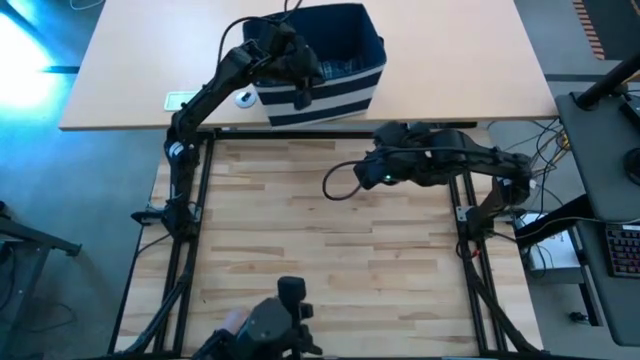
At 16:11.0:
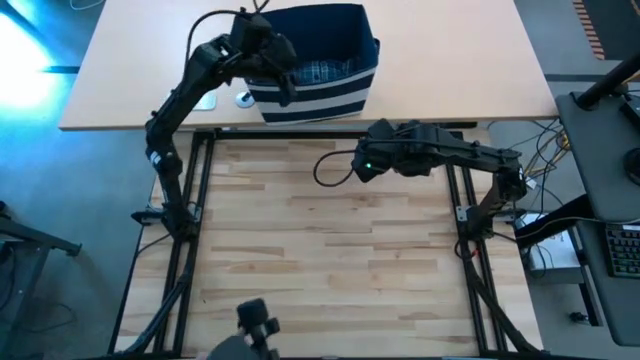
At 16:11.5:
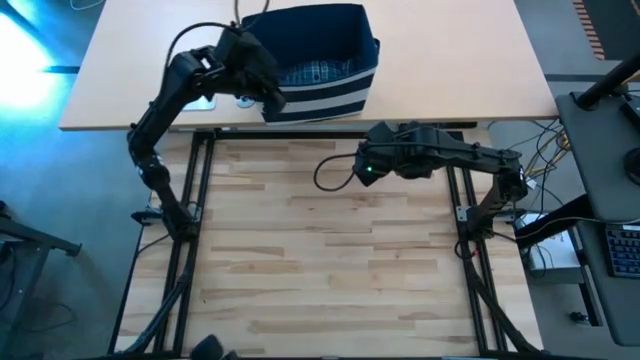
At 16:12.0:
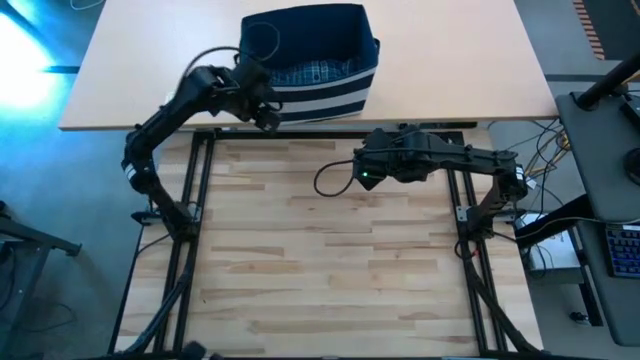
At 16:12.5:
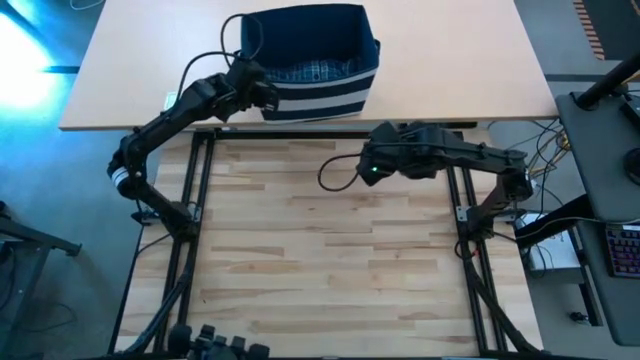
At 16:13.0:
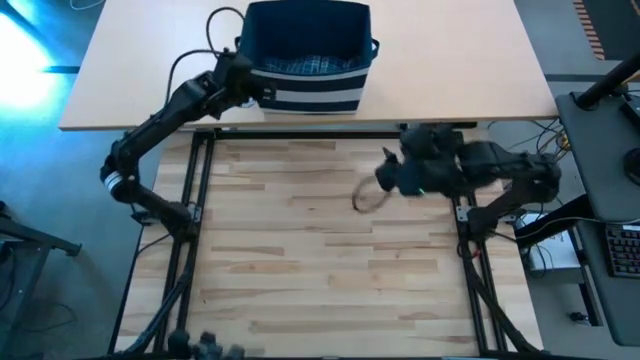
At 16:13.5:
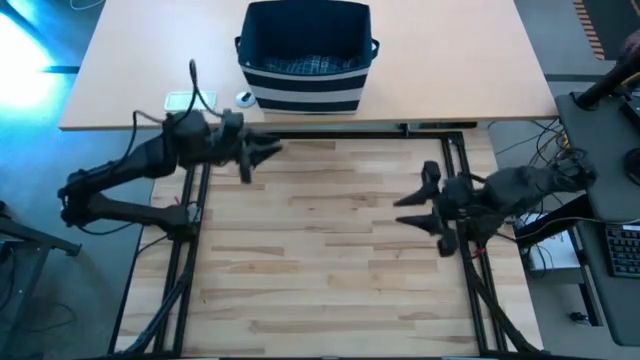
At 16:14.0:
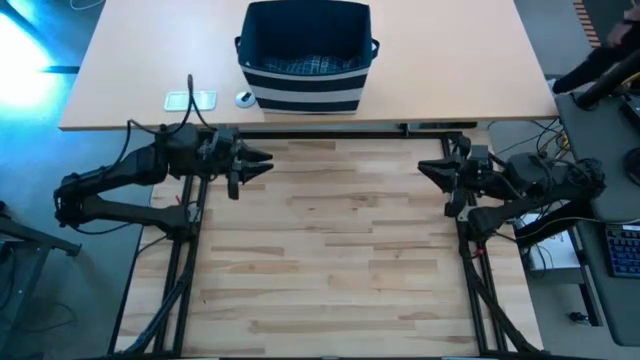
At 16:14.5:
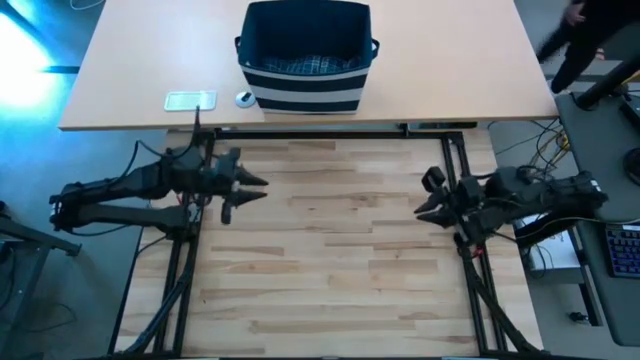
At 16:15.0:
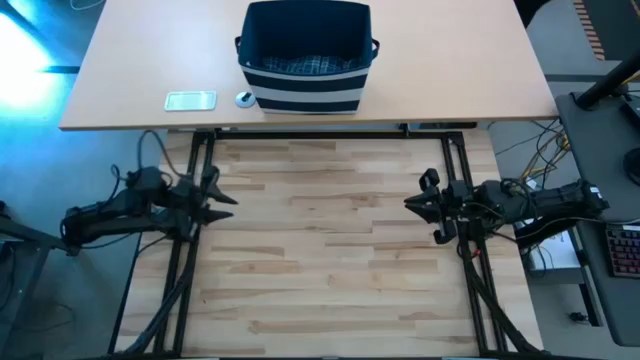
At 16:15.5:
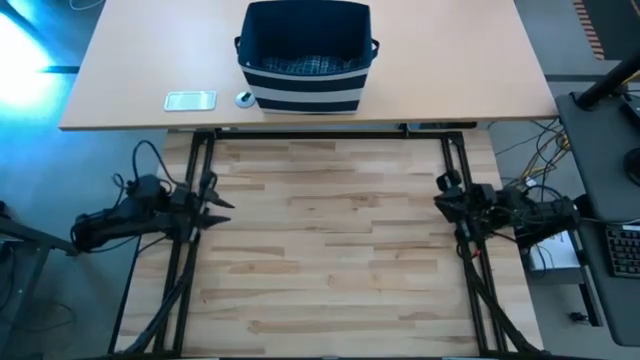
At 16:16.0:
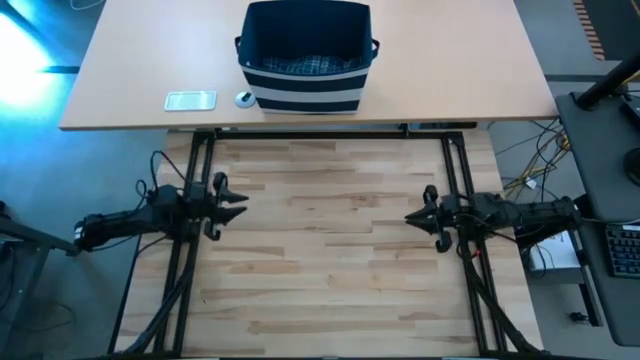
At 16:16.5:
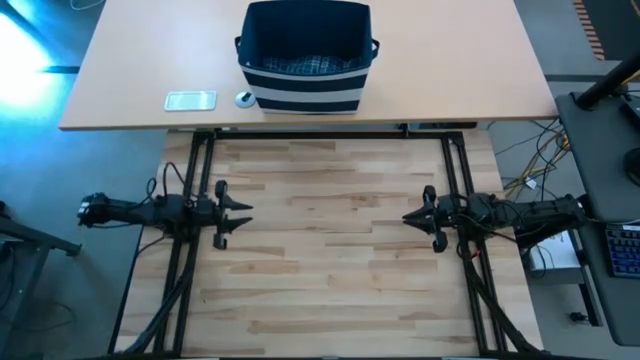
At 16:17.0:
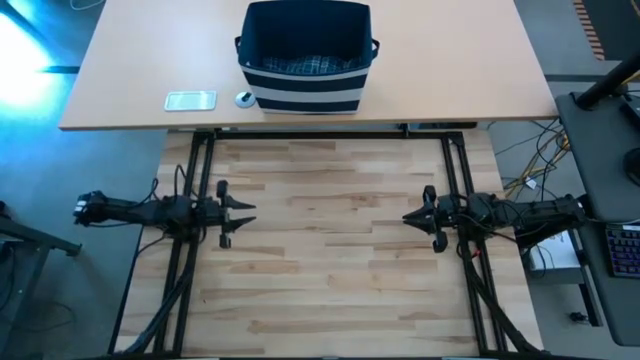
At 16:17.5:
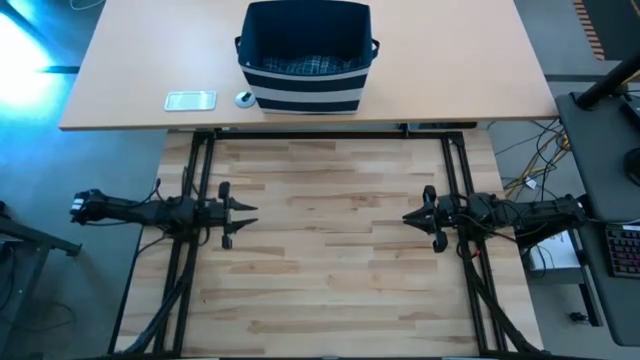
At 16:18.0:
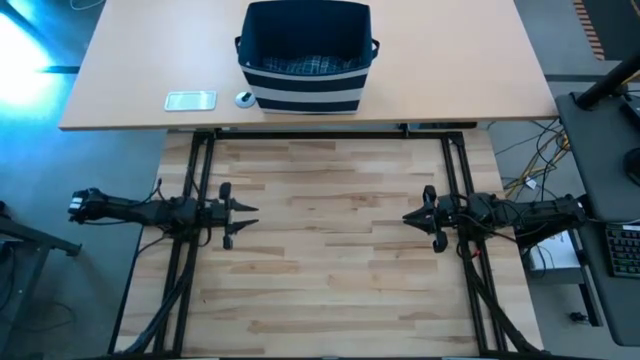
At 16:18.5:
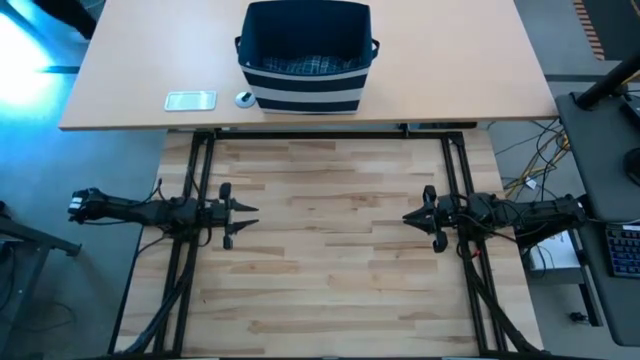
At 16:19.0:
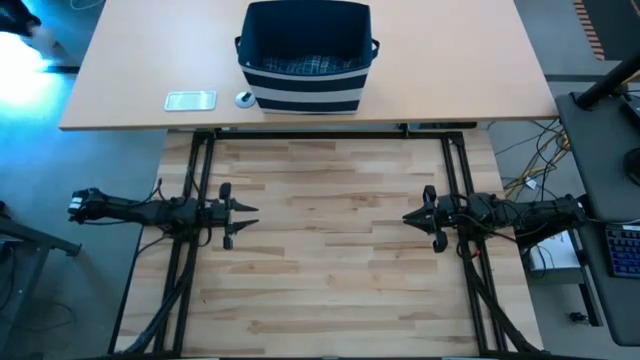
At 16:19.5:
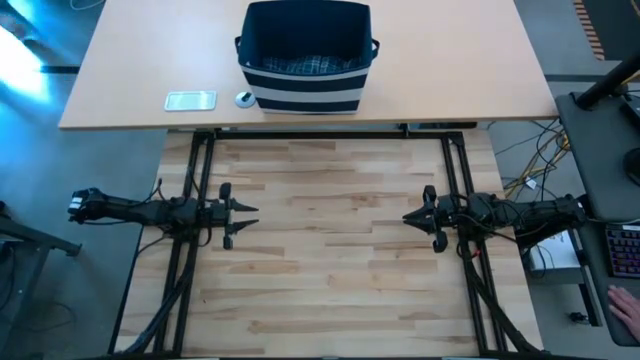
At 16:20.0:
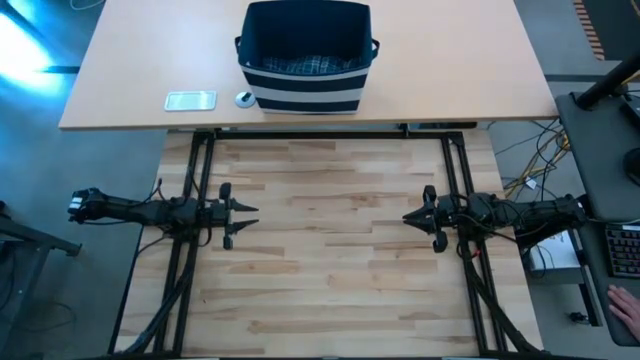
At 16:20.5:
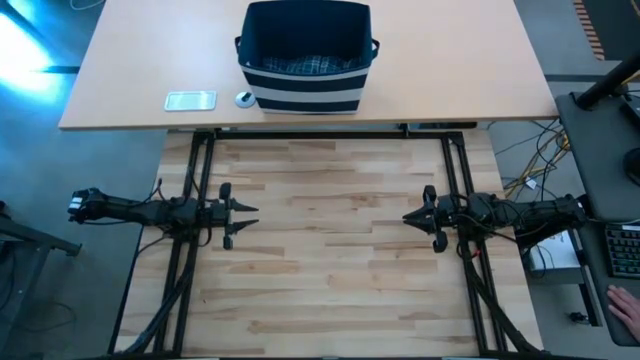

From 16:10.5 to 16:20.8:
Task: Fold Laundry from Bin
Return to Home Position

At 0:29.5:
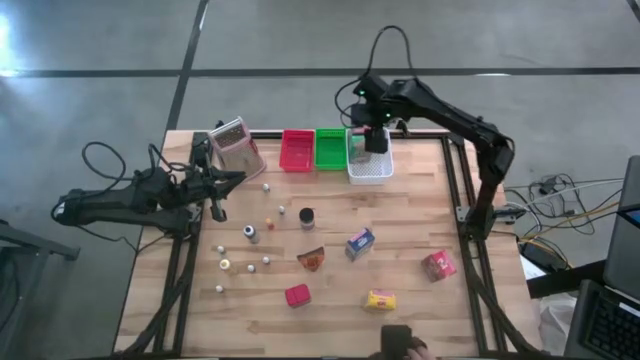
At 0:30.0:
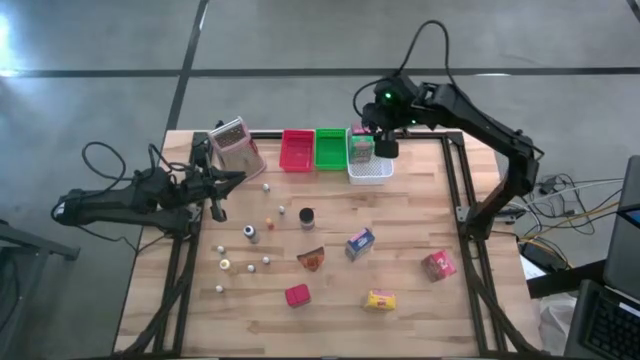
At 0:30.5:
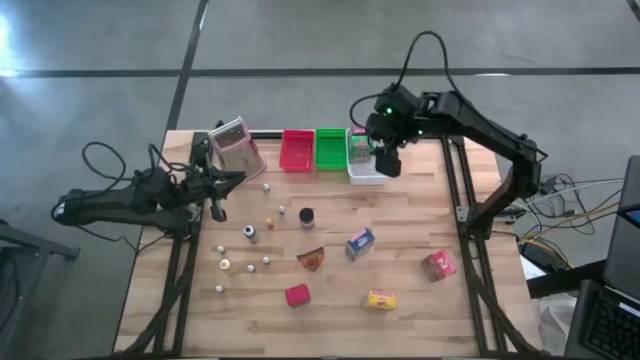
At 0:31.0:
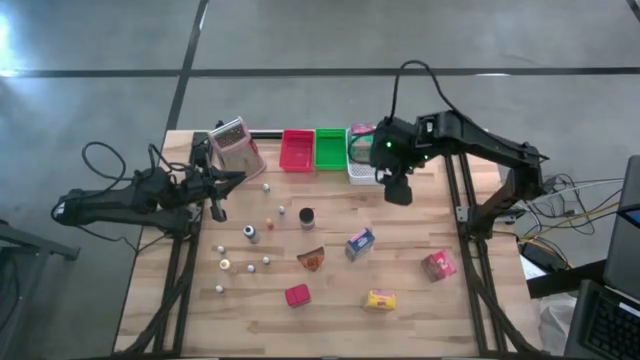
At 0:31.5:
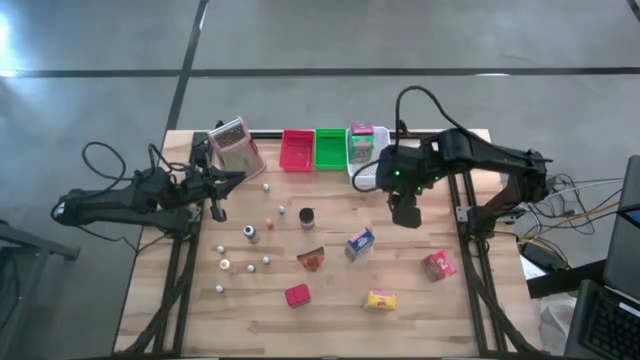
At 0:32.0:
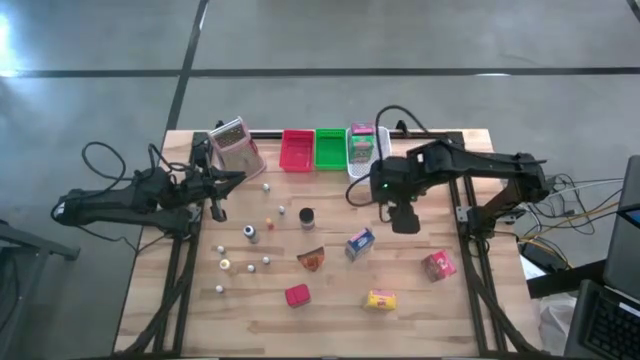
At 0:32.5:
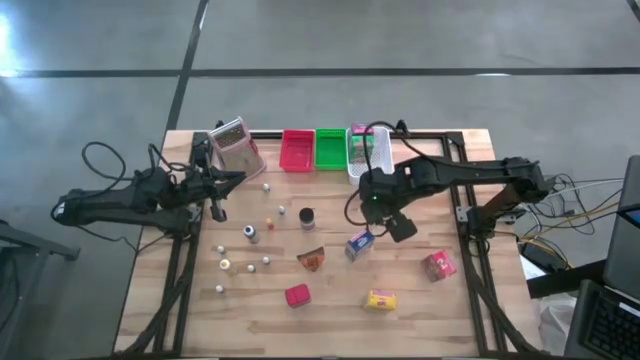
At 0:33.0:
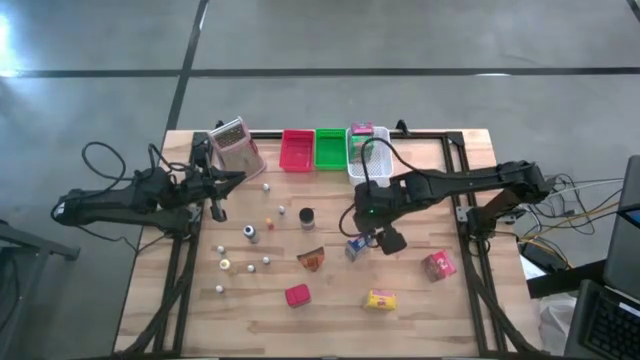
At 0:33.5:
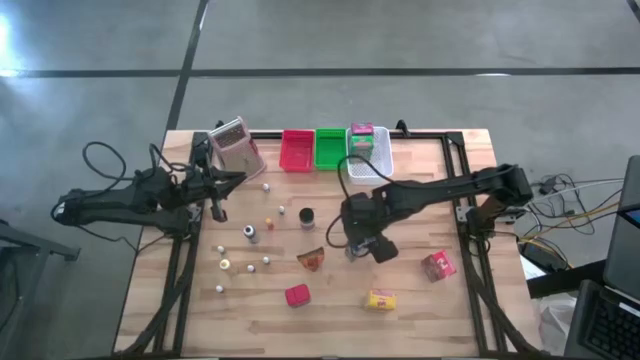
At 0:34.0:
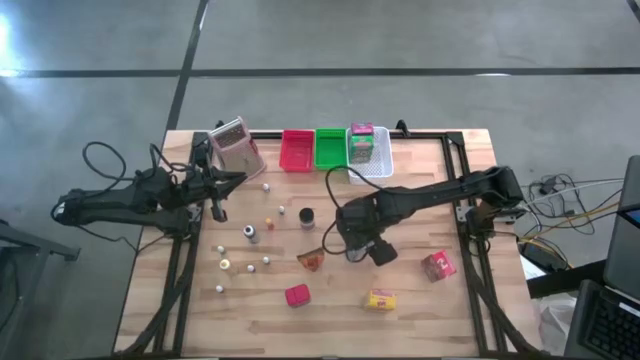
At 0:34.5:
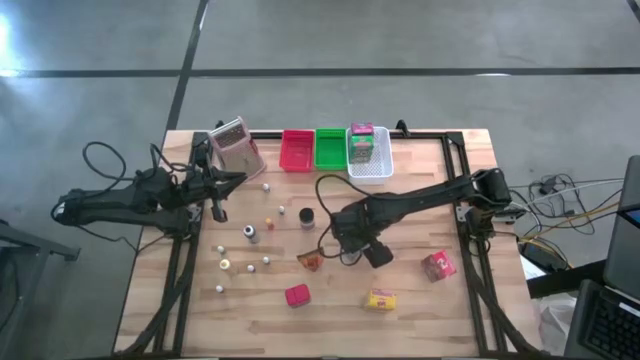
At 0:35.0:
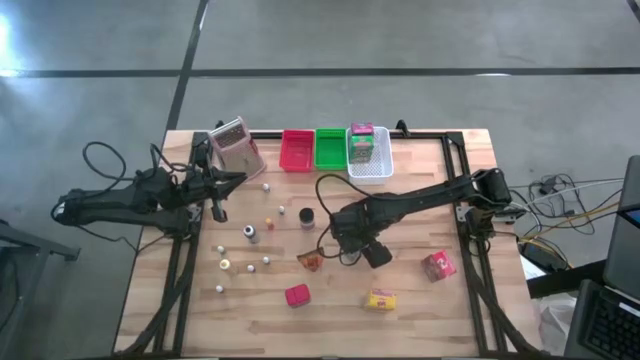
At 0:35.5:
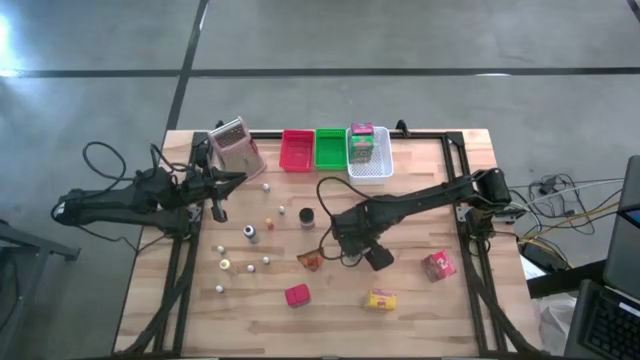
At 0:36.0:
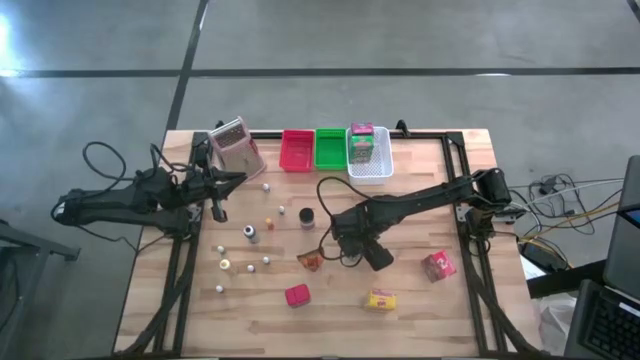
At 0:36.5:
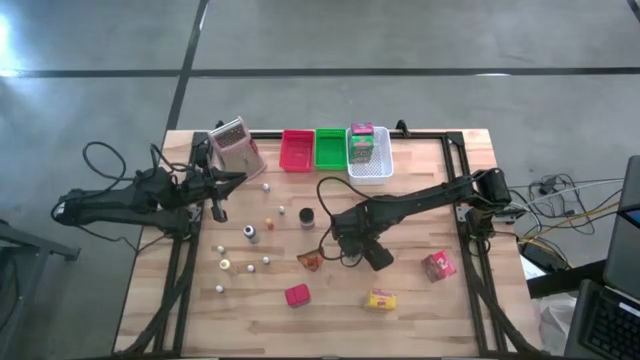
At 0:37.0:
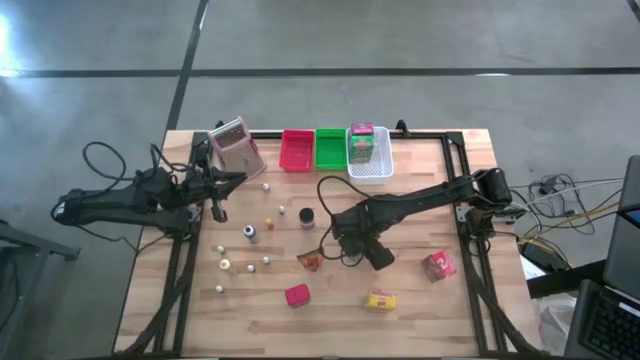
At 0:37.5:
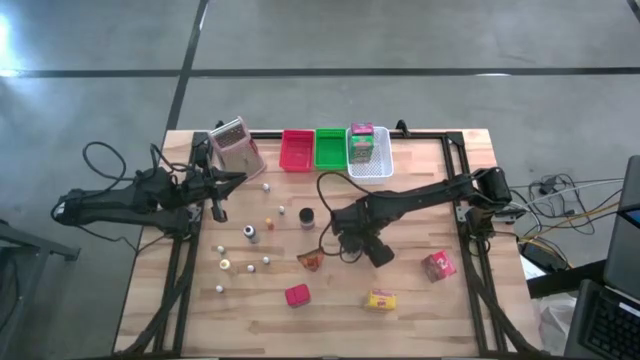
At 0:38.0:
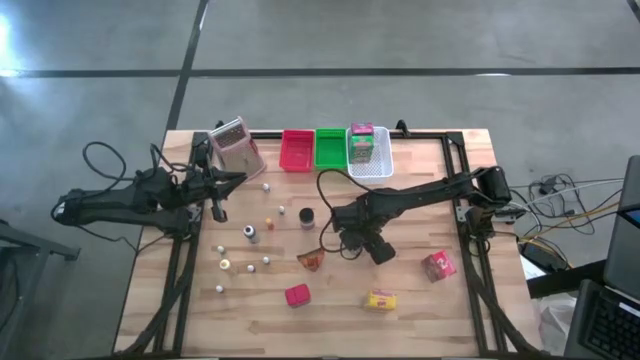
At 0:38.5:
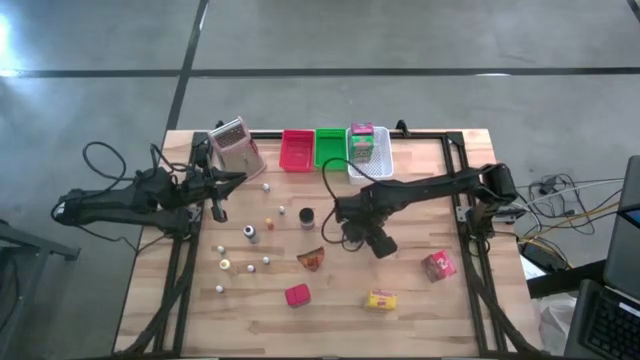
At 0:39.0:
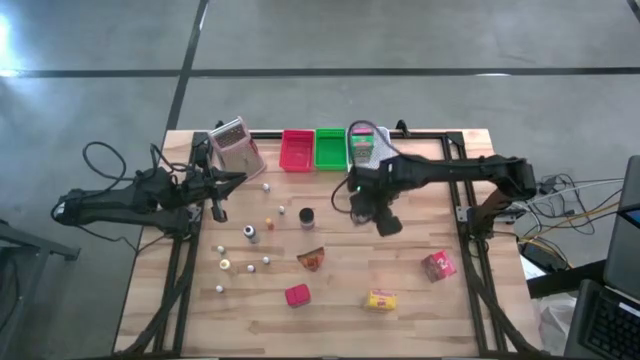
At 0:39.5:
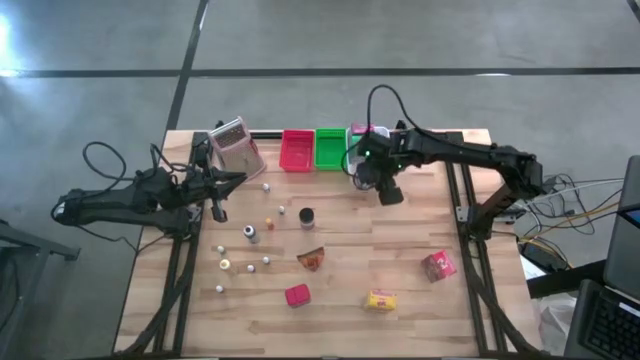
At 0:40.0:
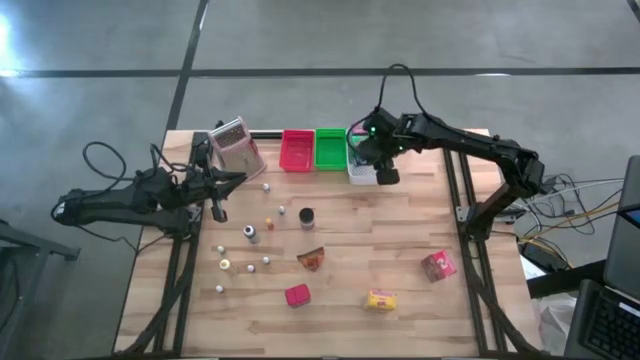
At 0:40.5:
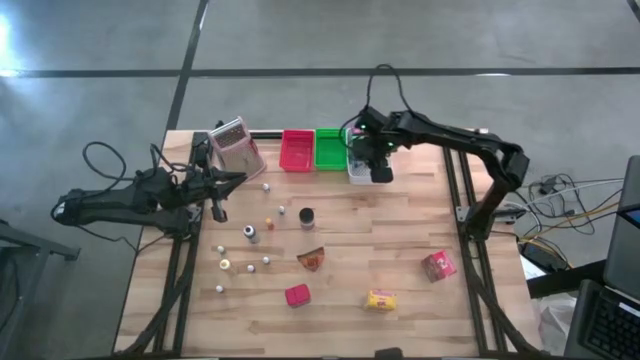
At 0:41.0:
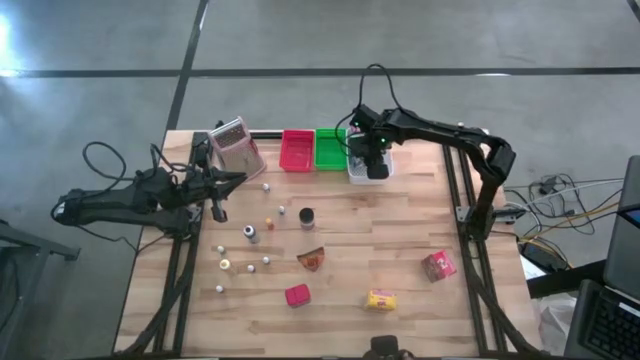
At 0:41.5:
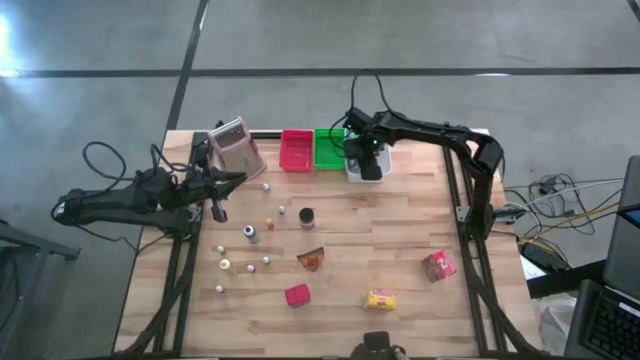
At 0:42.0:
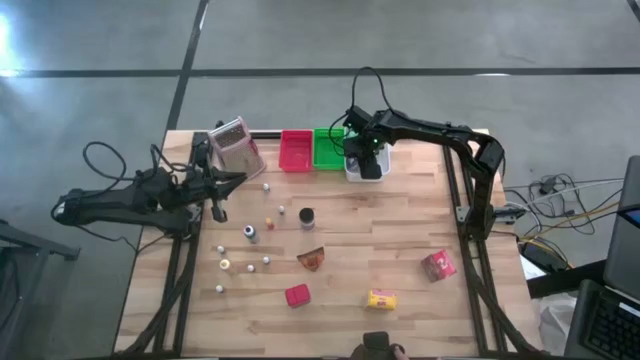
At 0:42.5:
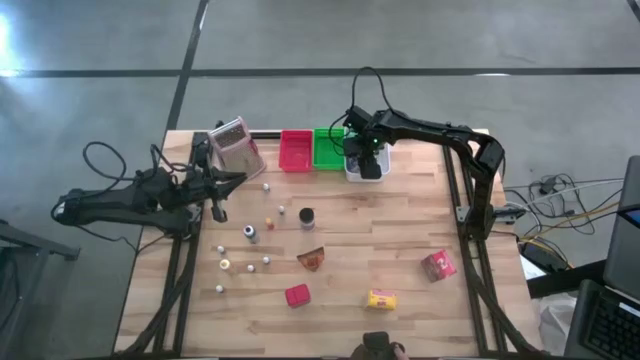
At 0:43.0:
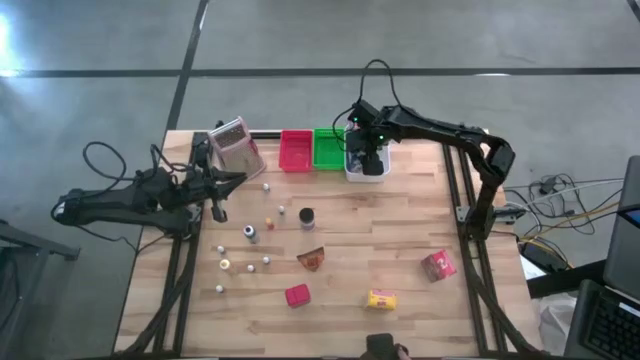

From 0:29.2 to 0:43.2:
Task: Pick & Place Kitchen Items
Put the blue cereal box into the white bin
